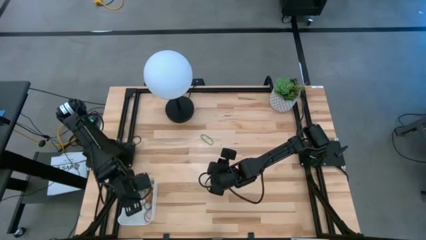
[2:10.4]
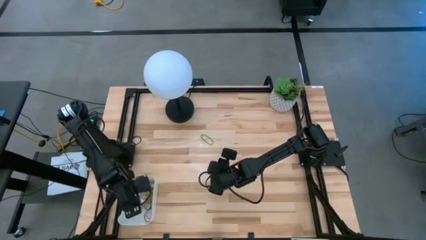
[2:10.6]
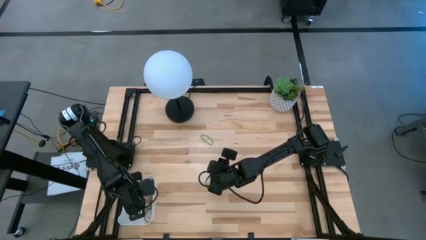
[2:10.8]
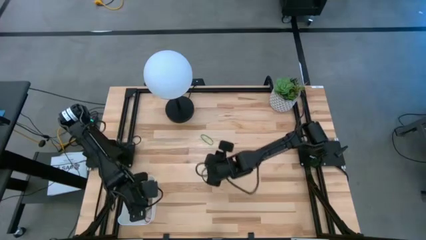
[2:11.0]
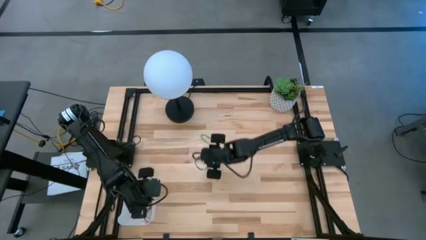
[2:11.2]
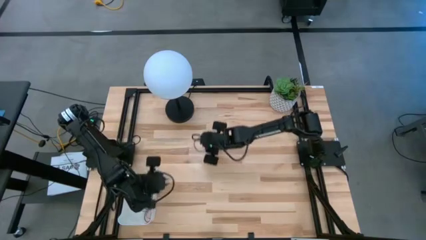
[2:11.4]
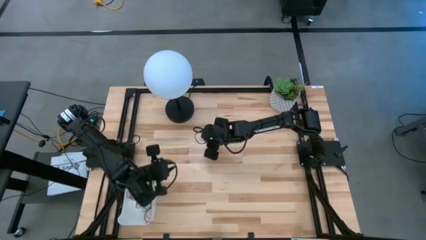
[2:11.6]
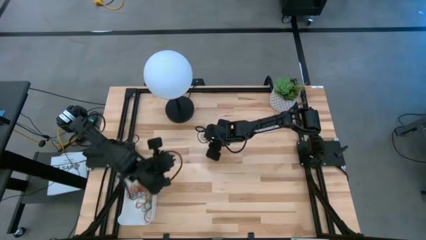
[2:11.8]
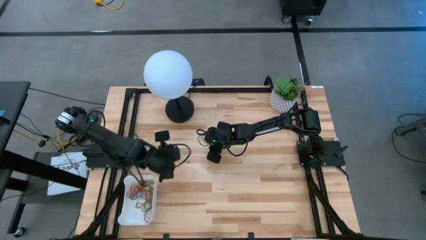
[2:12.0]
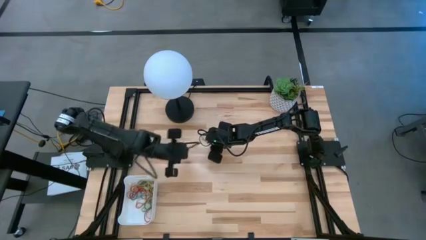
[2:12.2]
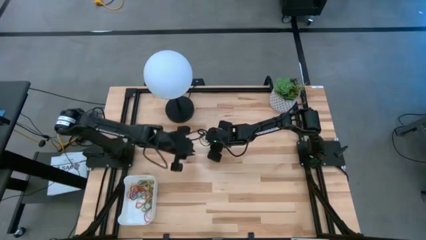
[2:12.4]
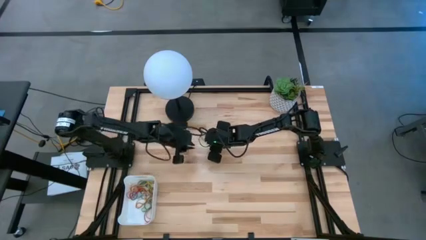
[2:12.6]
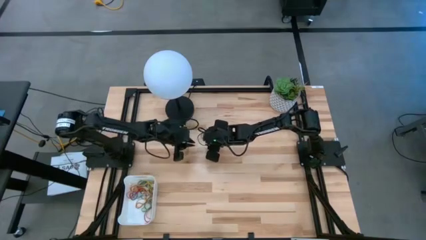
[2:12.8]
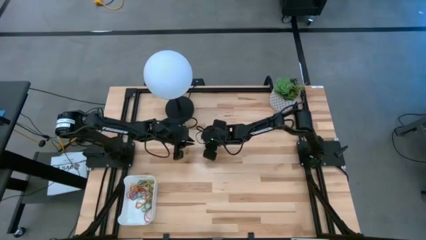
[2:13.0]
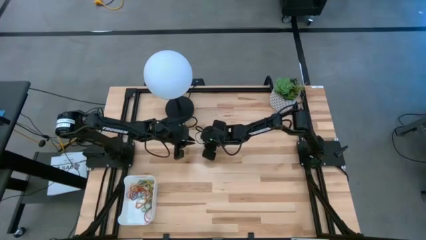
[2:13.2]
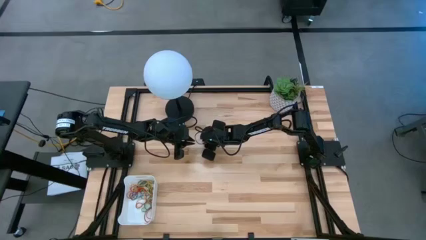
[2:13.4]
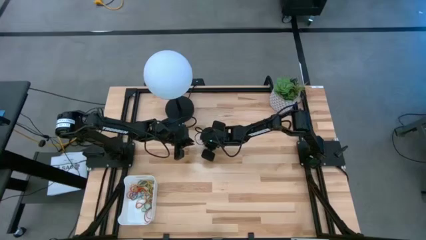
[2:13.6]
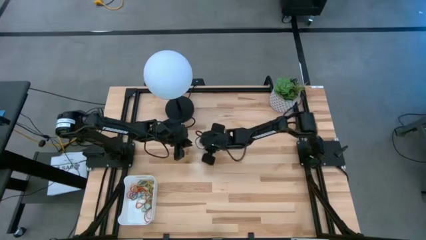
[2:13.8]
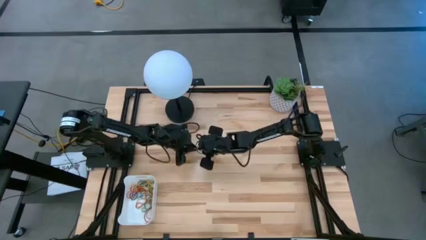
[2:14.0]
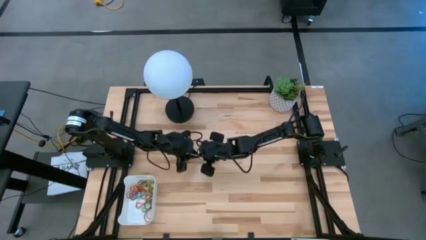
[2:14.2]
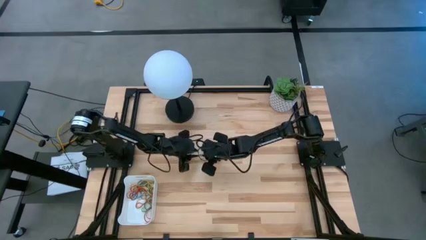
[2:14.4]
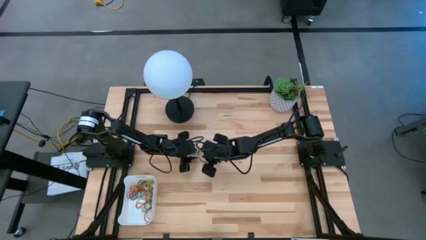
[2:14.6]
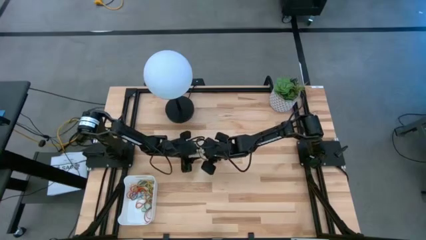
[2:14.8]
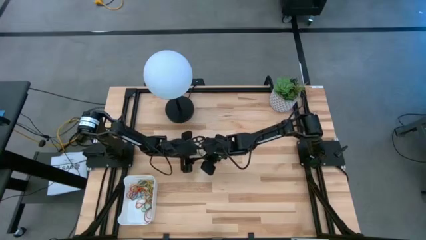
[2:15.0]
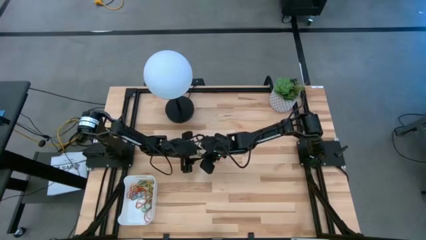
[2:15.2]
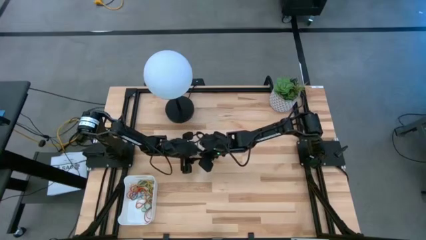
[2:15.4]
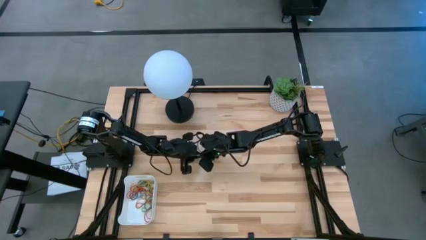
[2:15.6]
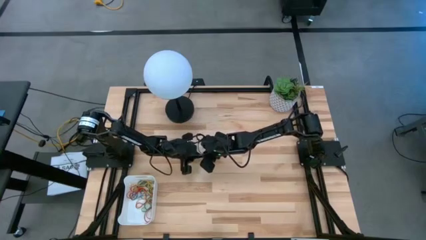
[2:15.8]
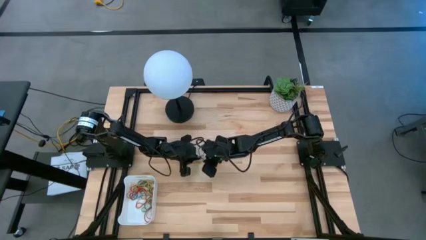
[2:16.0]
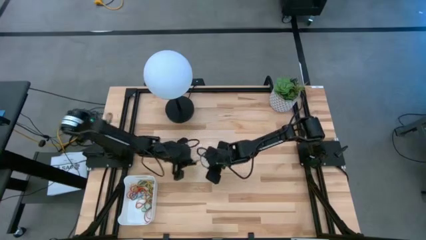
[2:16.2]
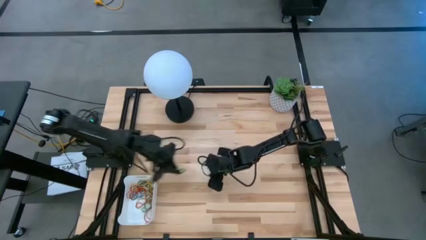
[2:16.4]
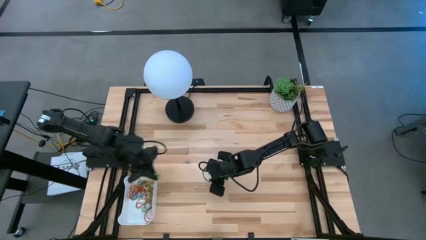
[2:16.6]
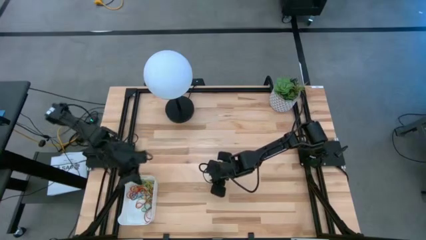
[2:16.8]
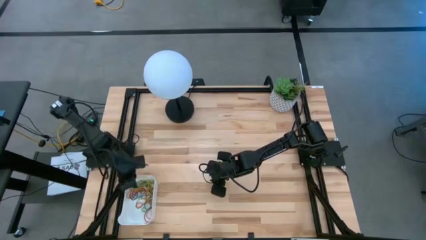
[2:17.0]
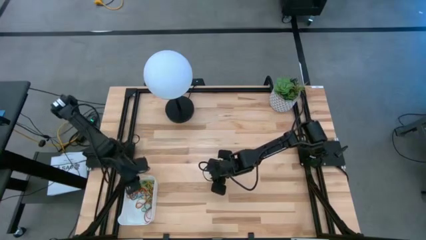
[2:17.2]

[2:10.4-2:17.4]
Task: Pick and place items into bin
Put the green rubber band into the white bin

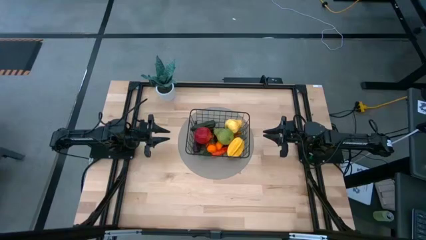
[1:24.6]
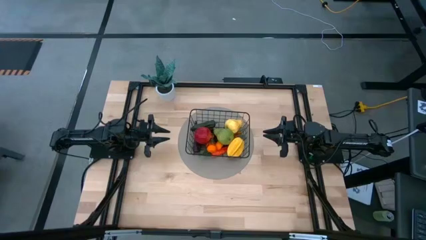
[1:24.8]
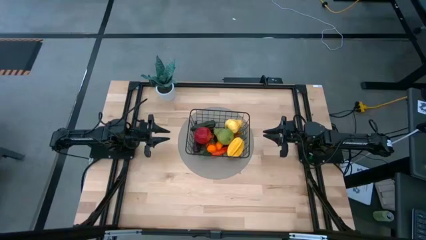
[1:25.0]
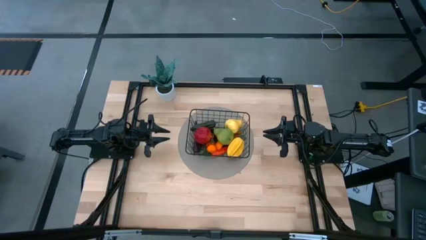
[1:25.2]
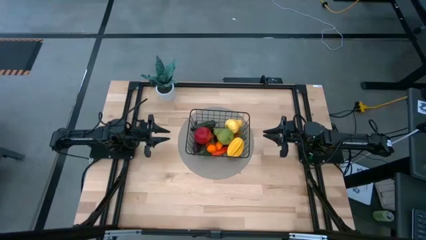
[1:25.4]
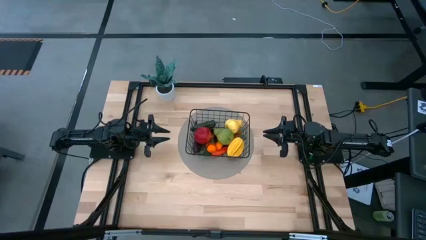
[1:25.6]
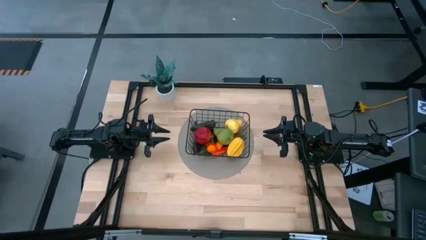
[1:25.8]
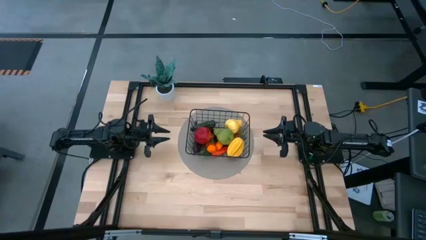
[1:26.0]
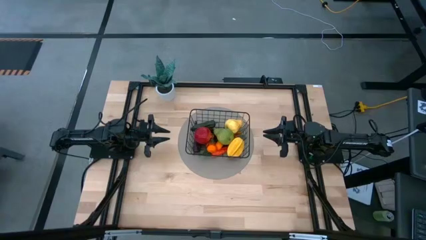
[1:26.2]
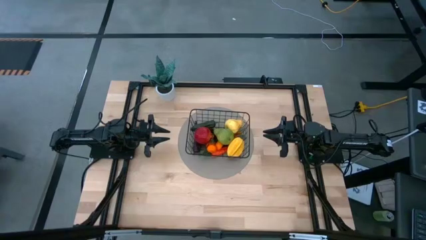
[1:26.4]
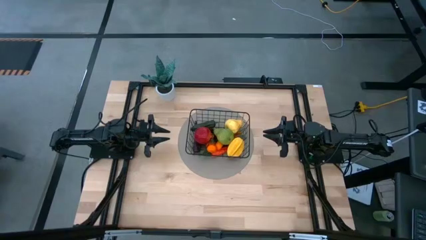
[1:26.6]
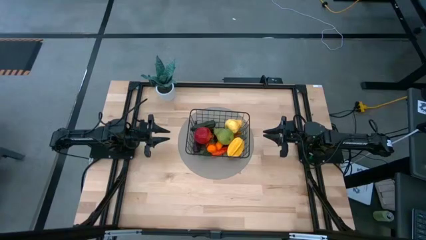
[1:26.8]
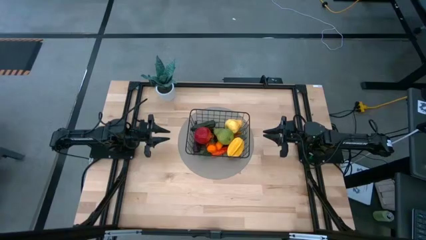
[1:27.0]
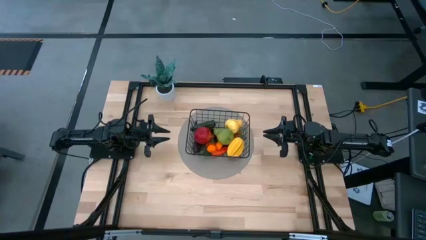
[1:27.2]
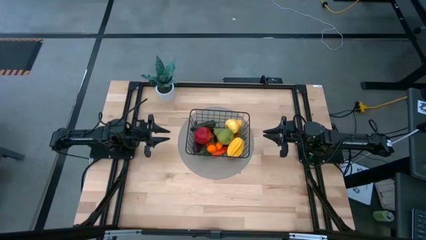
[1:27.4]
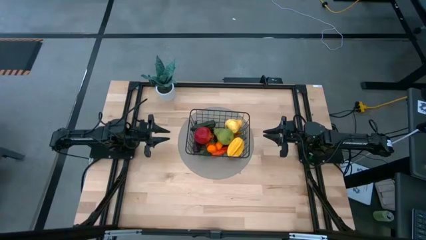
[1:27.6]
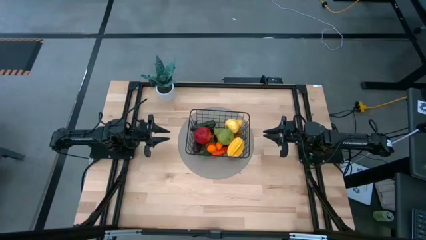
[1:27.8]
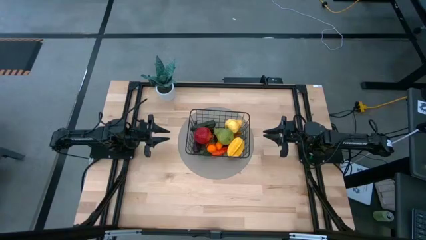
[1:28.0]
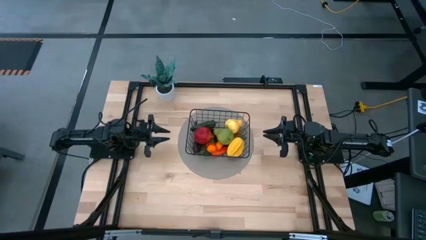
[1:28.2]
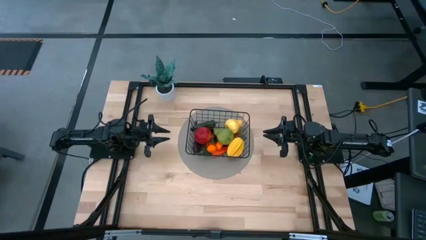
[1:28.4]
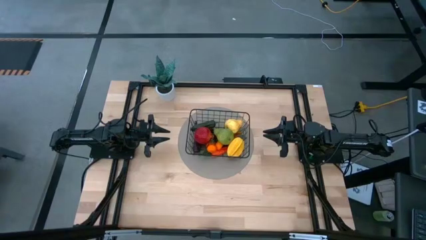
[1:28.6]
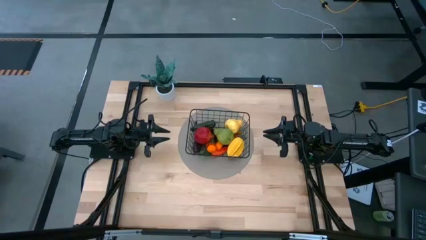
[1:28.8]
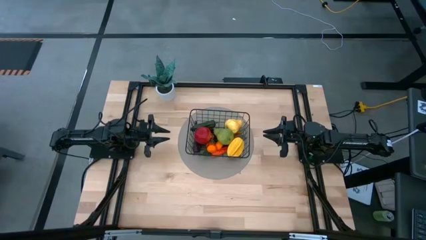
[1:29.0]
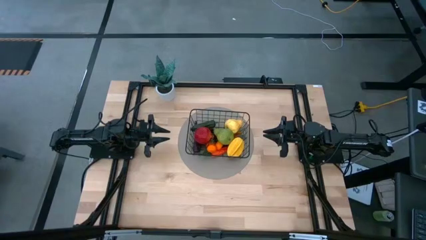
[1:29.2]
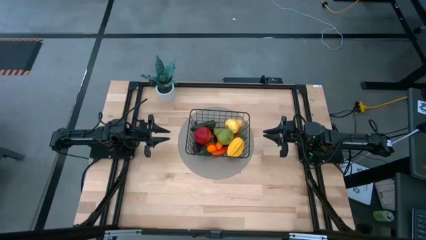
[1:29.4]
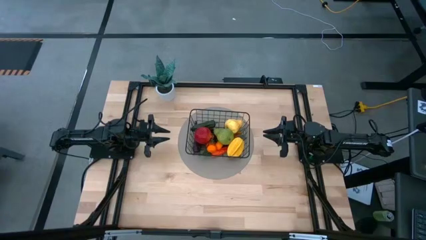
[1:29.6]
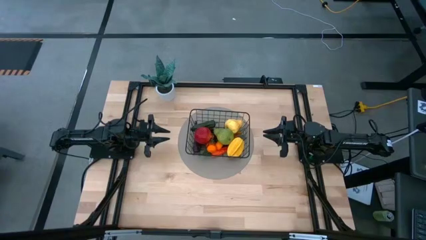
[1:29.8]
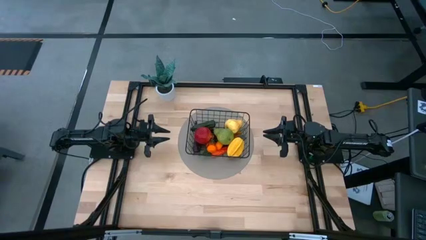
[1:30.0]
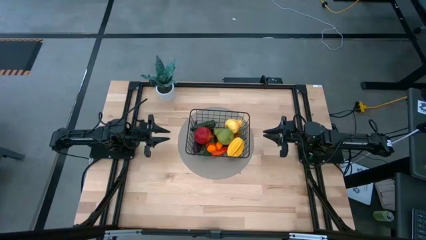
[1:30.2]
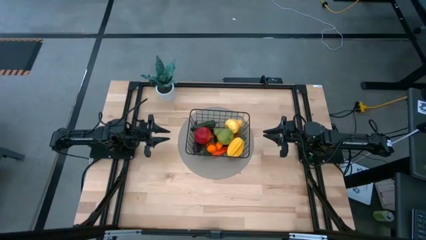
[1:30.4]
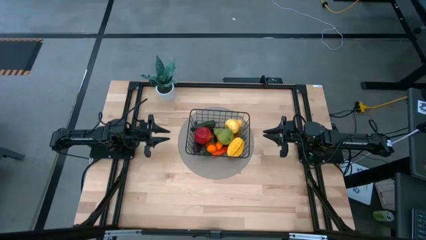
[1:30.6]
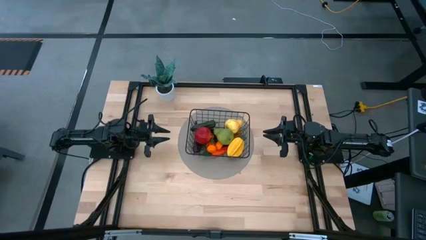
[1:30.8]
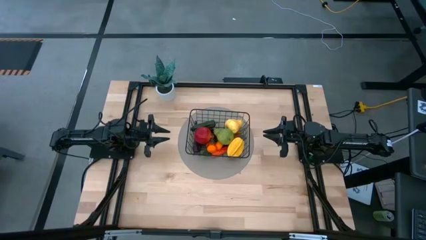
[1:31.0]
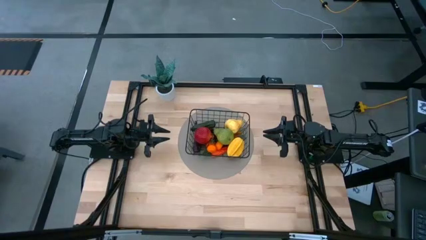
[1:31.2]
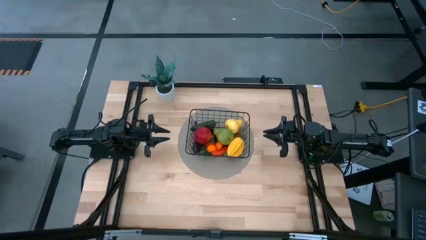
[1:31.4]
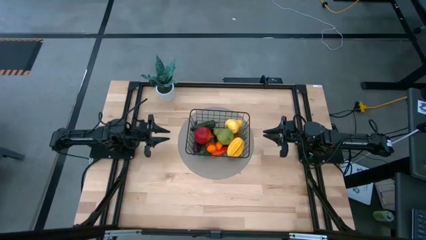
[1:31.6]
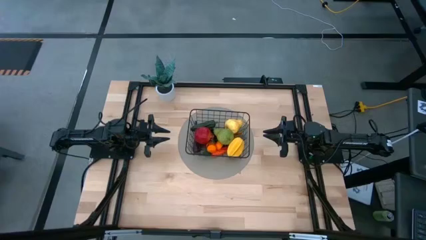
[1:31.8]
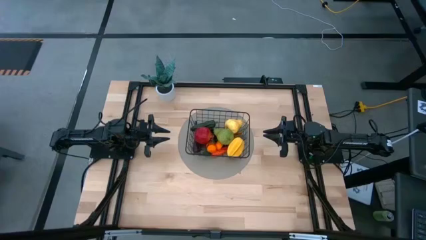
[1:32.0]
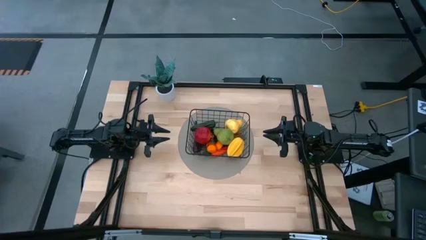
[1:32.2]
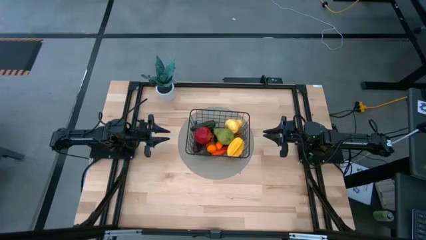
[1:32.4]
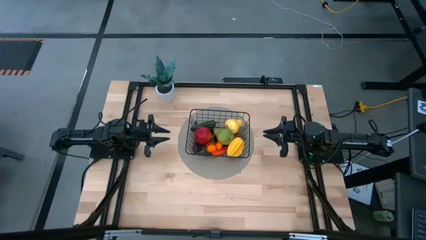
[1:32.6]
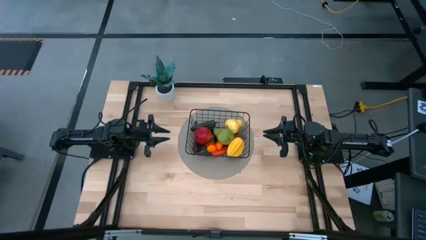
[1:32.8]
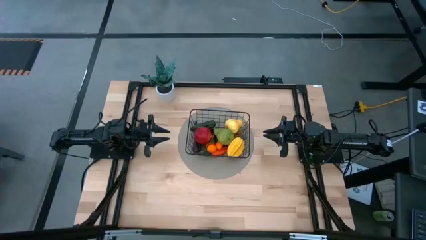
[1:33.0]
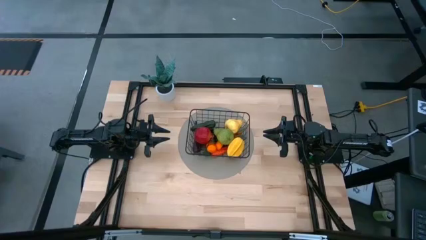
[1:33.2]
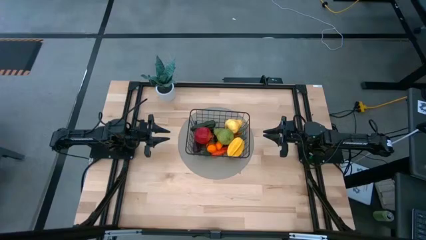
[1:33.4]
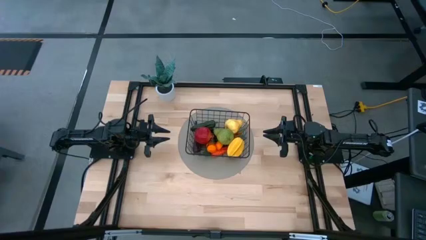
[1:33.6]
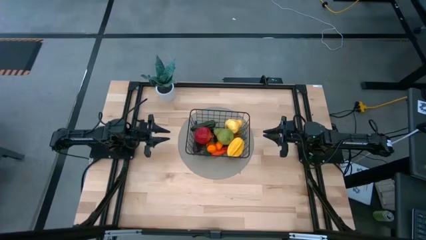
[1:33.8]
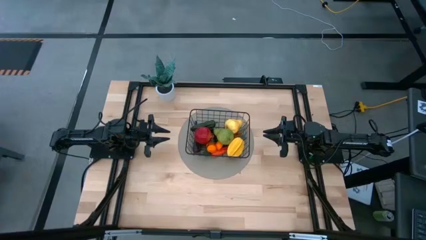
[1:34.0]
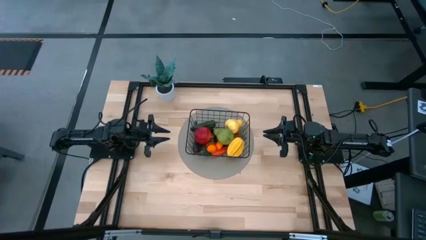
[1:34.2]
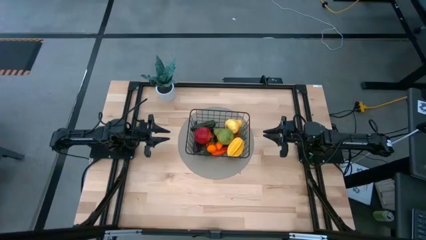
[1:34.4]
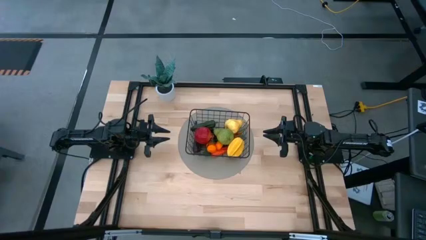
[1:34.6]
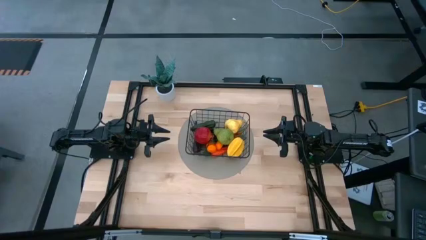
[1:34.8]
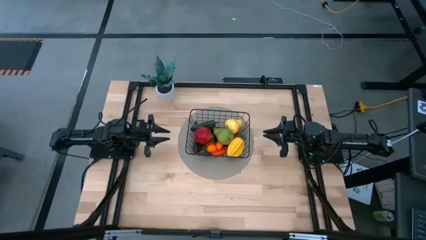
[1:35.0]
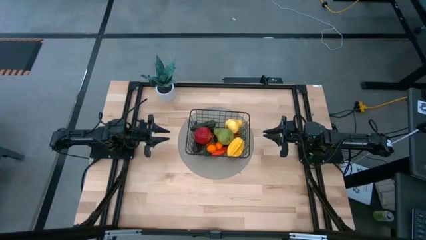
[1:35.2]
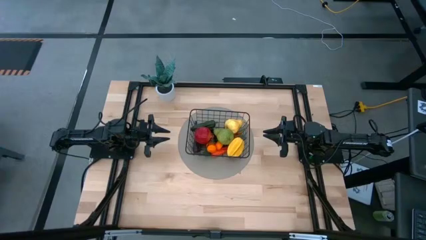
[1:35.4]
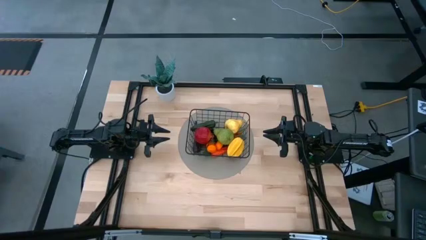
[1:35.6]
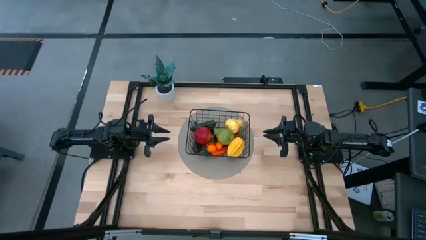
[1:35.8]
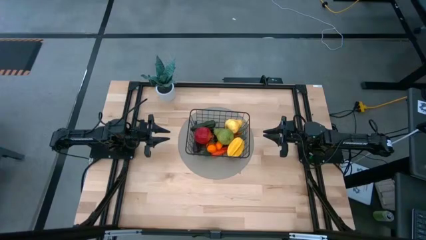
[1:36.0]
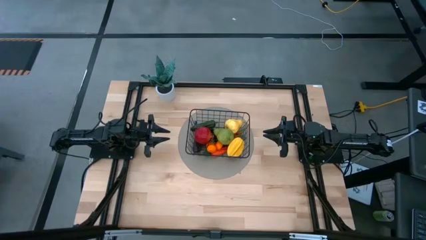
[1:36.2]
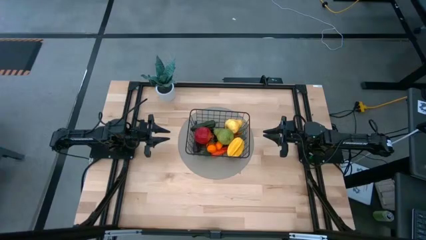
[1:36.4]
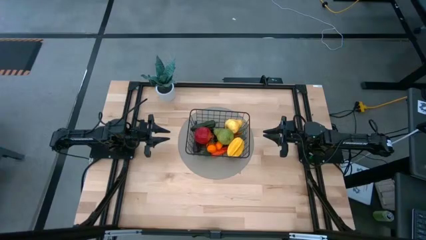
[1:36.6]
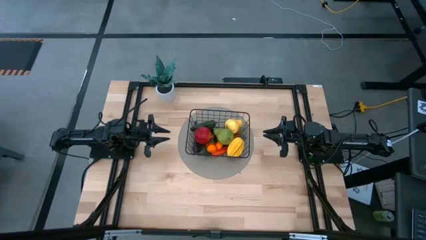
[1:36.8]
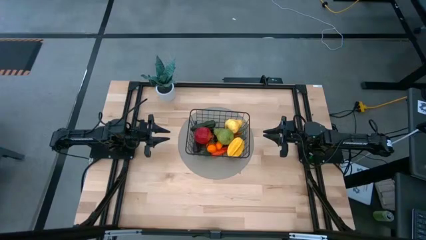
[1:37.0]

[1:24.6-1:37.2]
Task: Build produce basket
Return to Home Position
